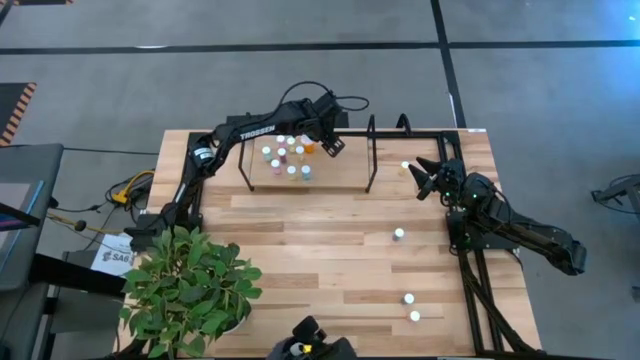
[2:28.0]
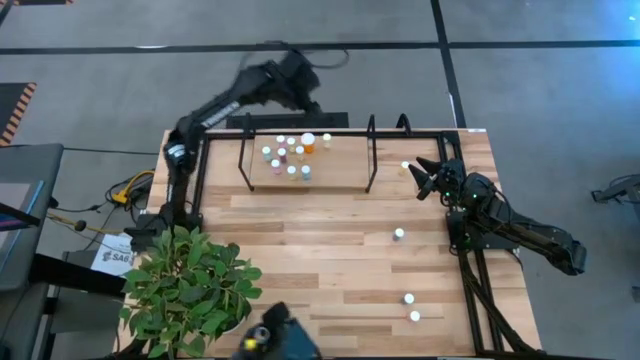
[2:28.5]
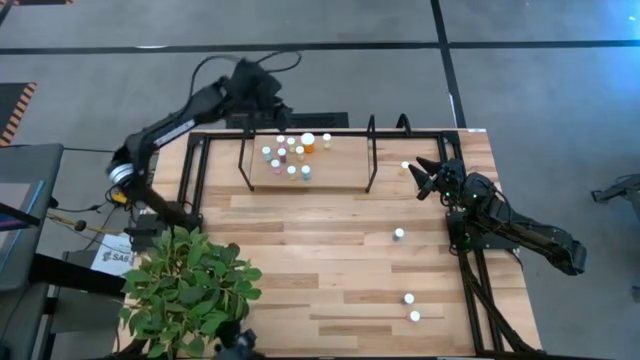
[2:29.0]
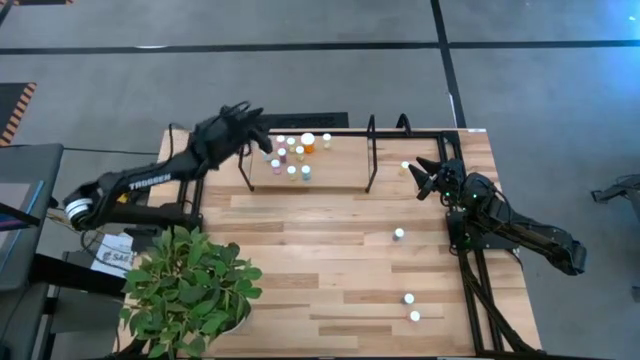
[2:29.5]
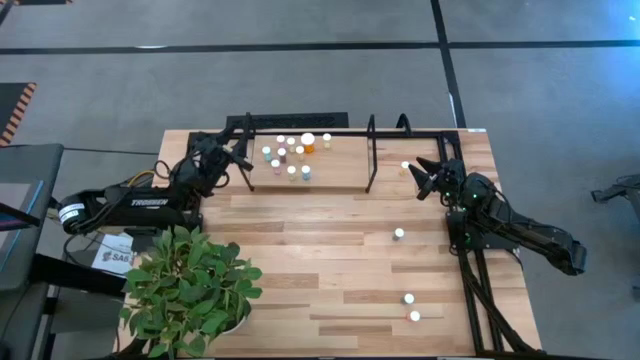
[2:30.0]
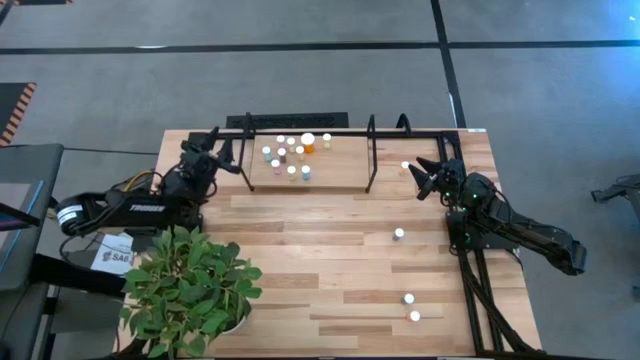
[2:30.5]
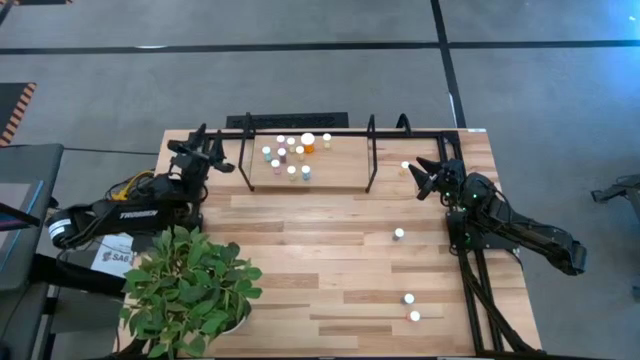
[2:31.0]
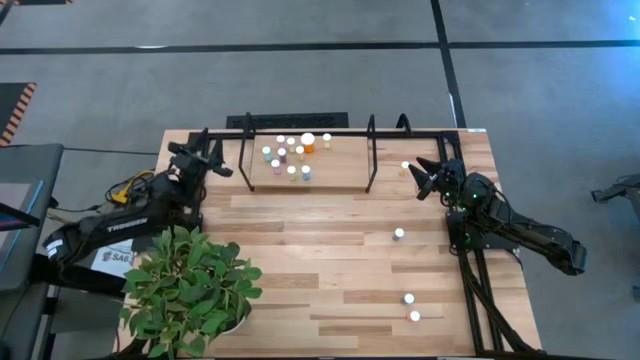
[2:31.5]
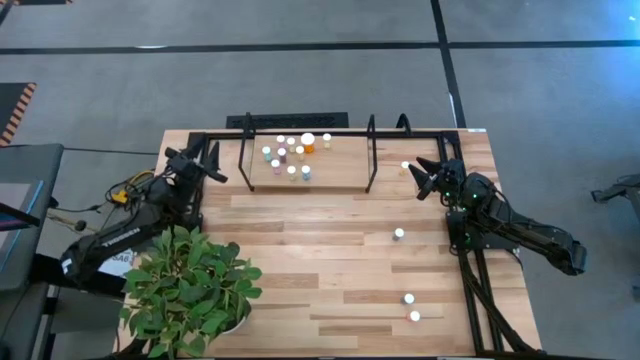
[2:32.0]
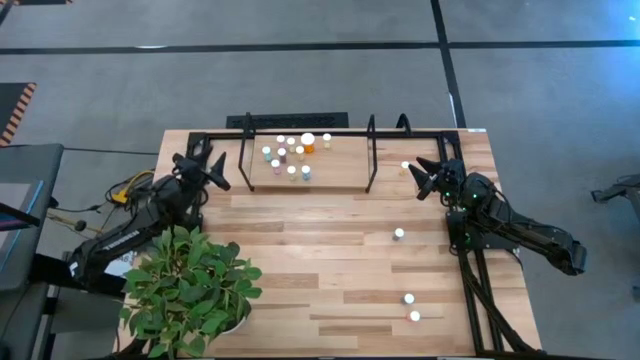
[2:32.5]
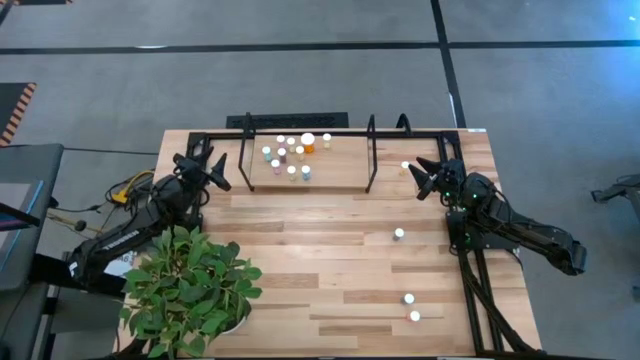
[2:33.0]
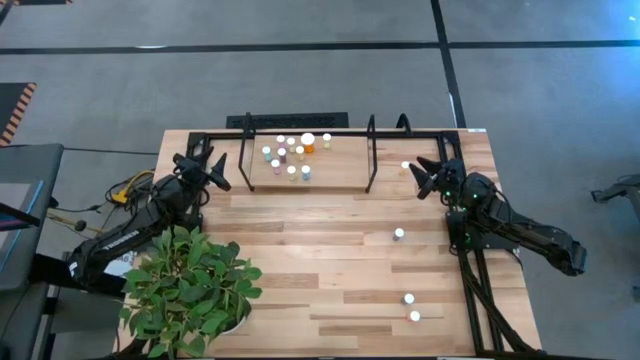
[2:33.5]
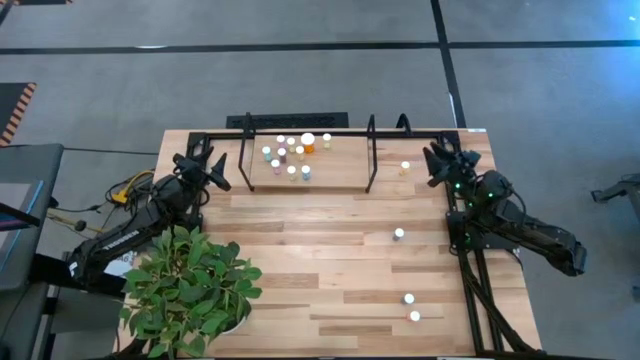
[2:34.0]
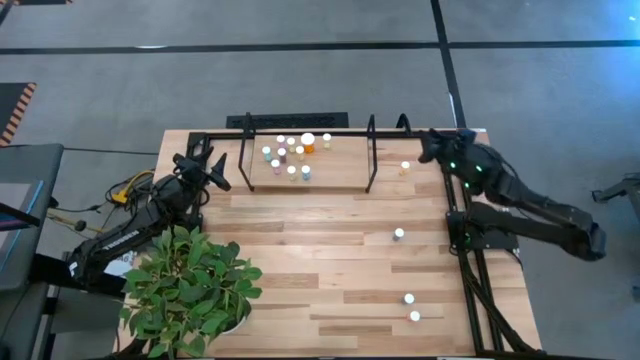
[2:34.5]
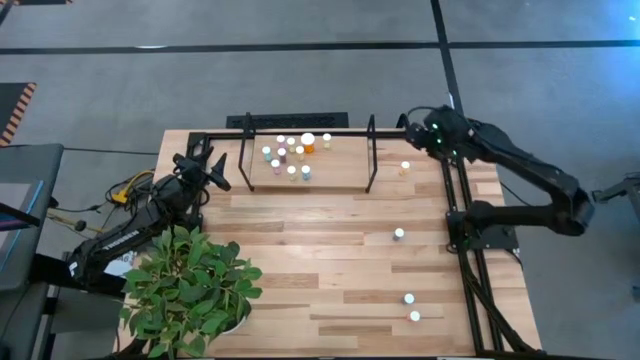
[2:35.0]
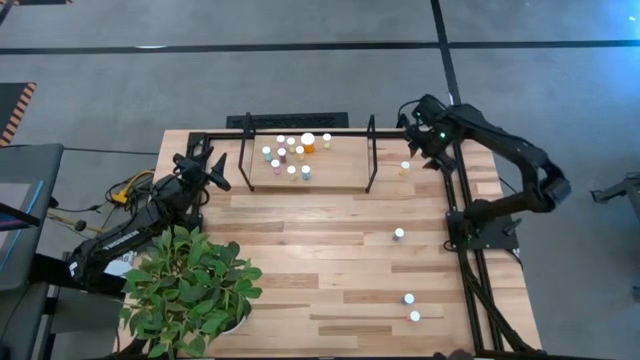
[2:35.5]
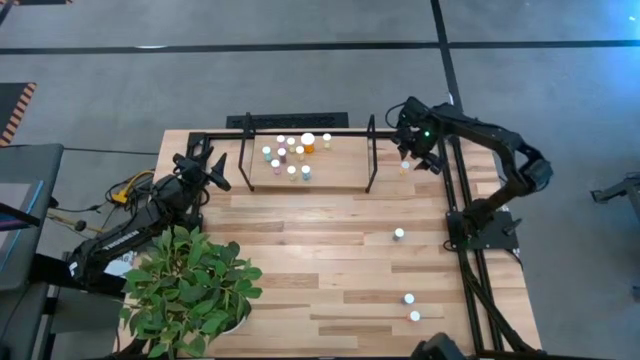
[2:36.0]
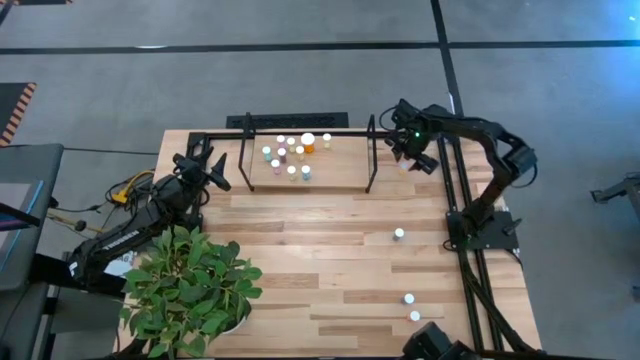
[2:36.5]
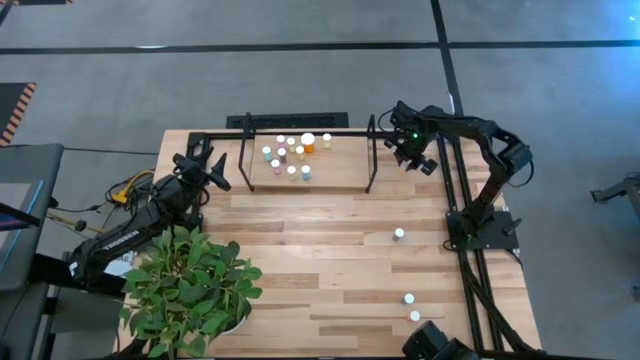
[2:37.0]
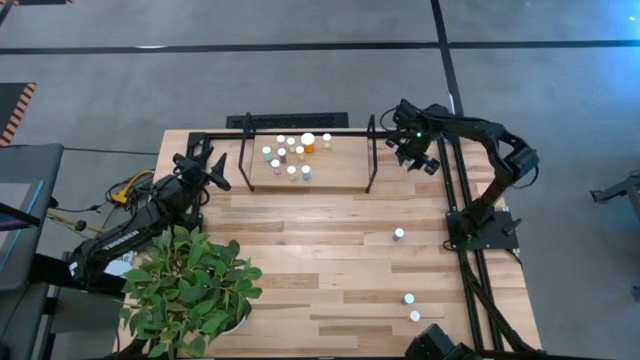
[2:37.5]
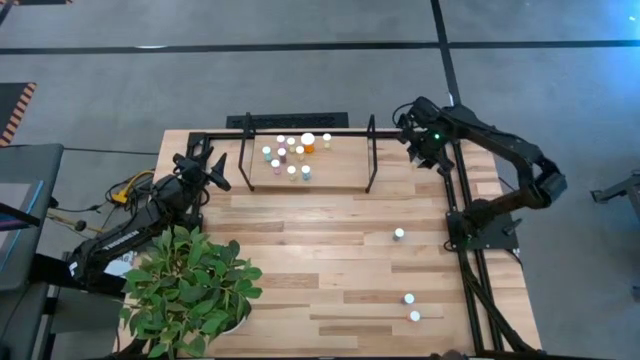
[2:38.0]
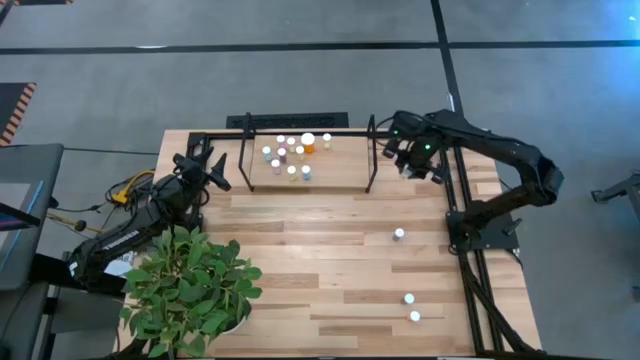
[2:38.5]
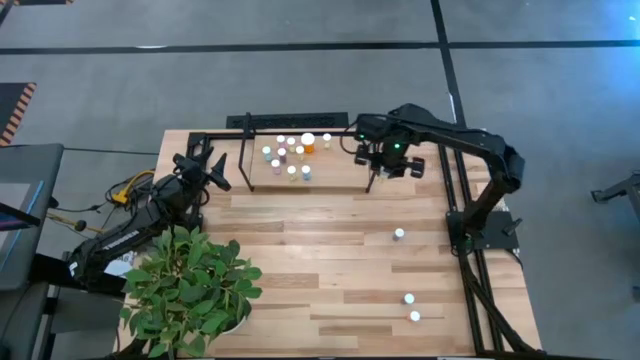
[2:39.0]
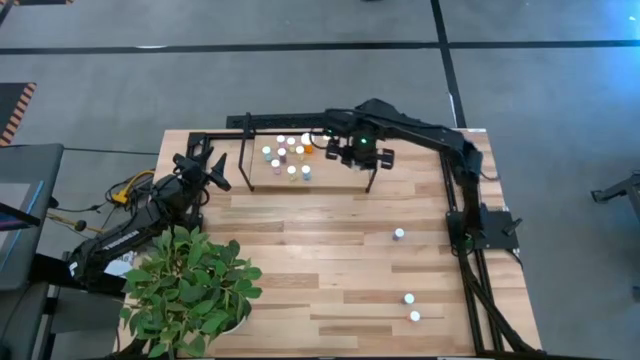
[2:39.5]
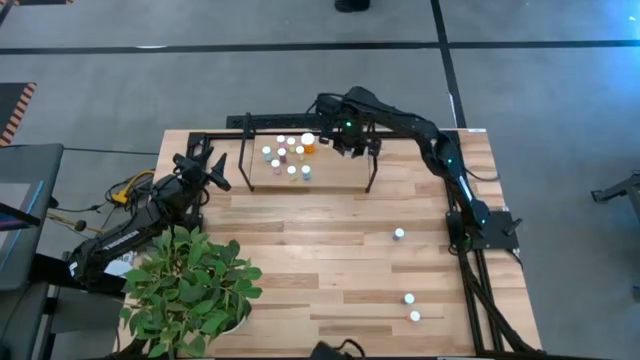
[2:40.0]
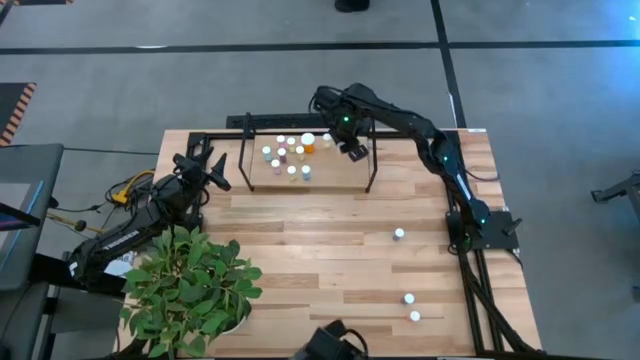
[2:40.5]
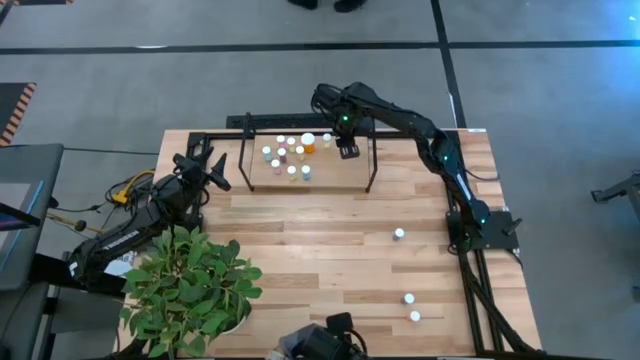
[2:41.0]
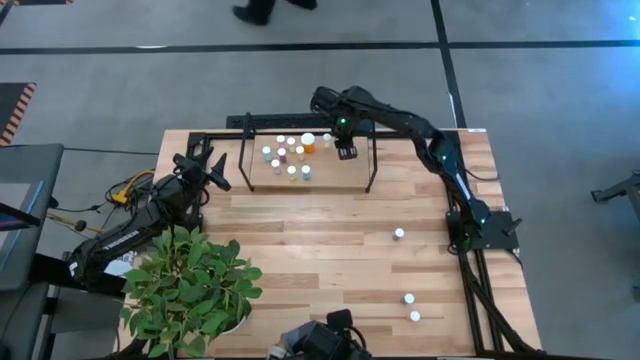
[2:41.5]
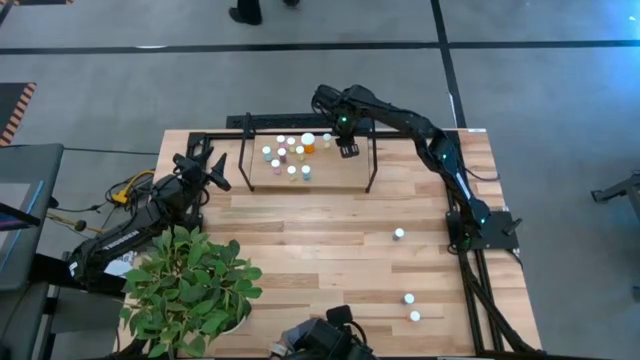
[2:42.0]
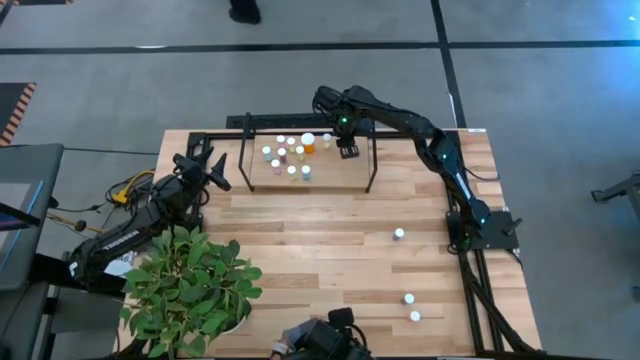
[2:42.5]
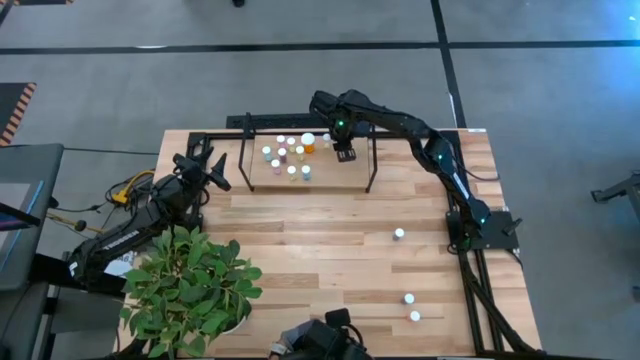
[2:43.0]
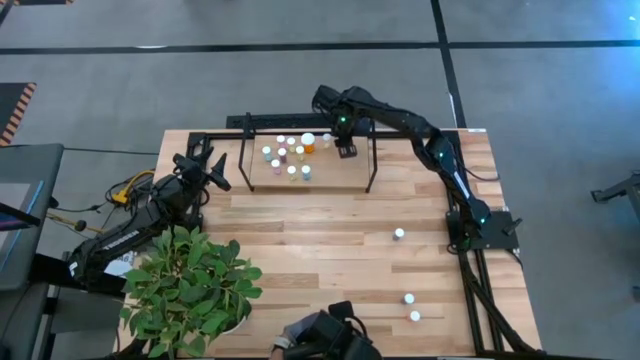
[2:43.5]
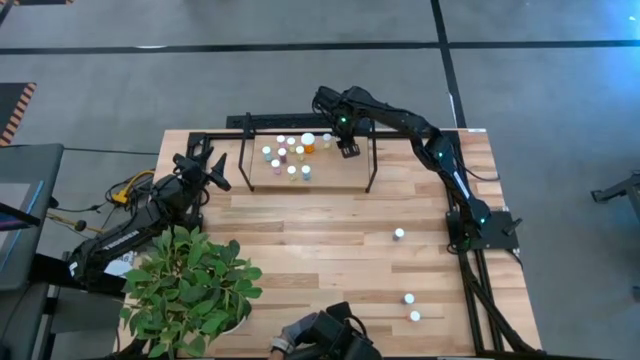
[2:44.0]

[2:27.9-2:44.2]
Task: Pick and place medicine bottles onto shelf by color
Put the yellow pill bottle on the shelf

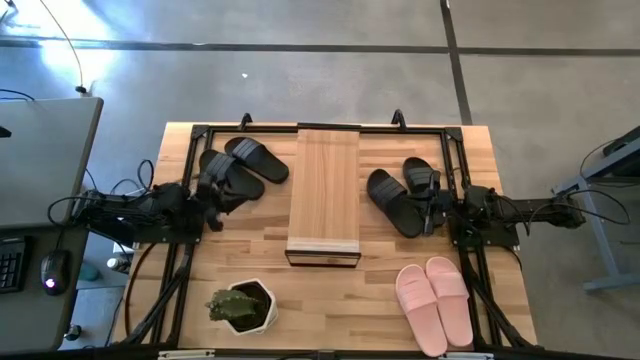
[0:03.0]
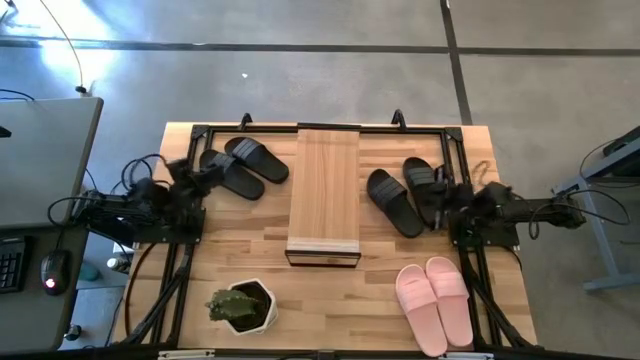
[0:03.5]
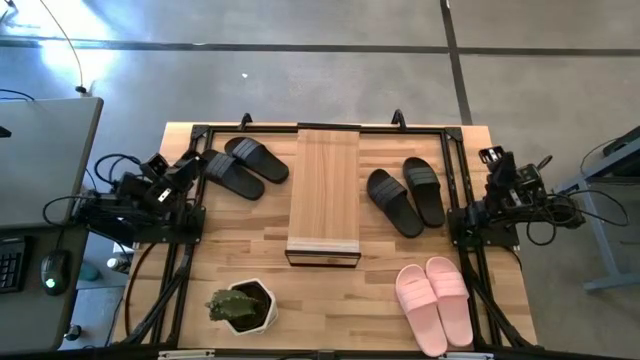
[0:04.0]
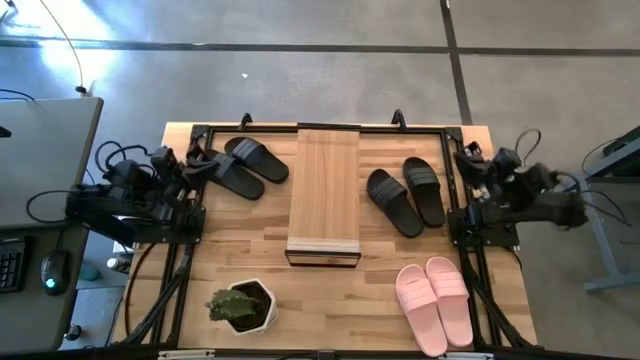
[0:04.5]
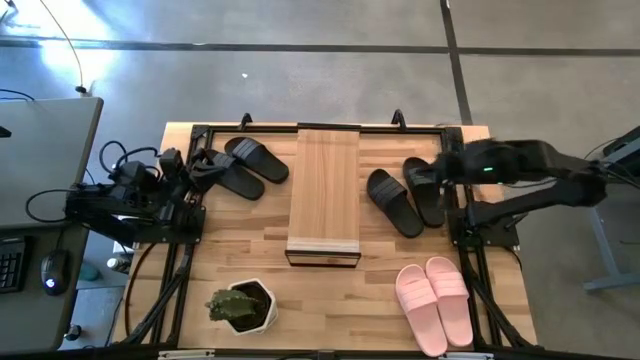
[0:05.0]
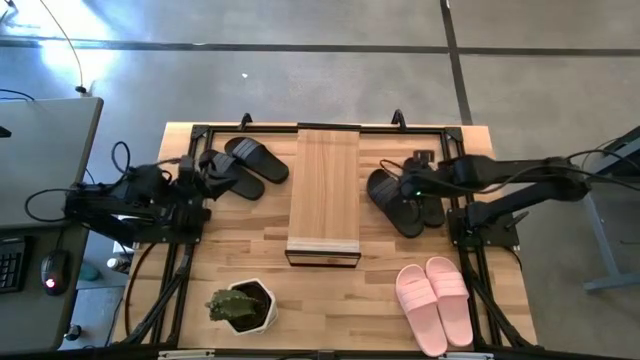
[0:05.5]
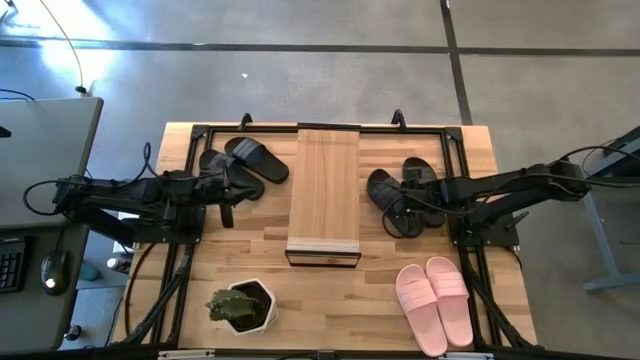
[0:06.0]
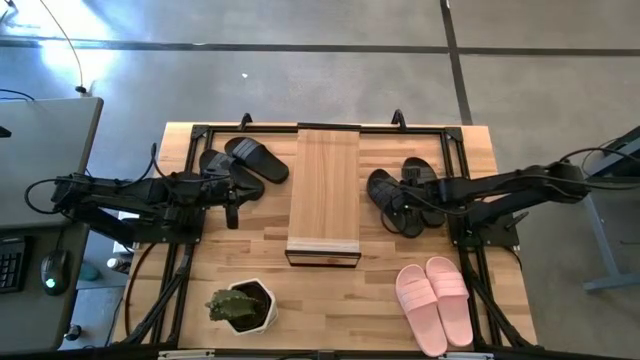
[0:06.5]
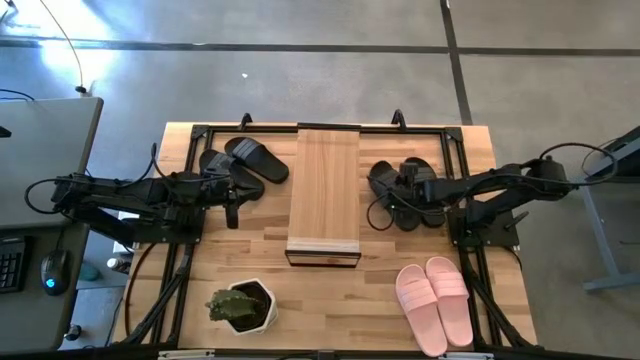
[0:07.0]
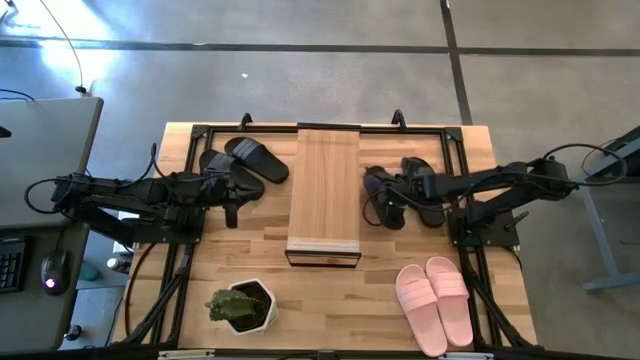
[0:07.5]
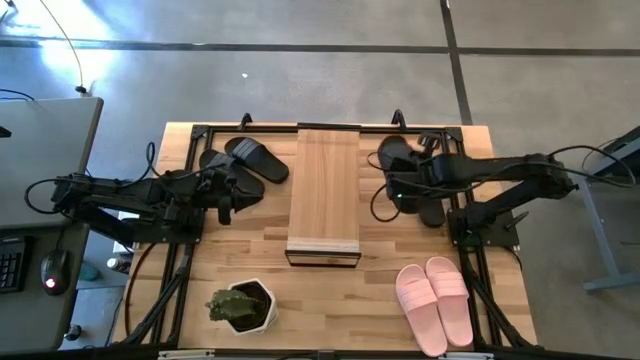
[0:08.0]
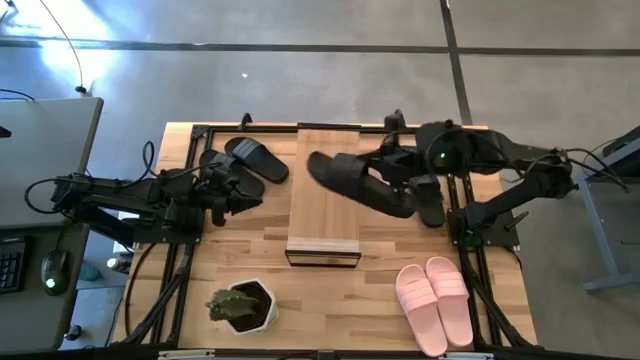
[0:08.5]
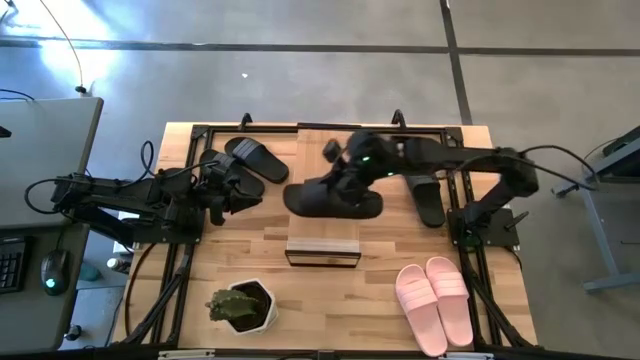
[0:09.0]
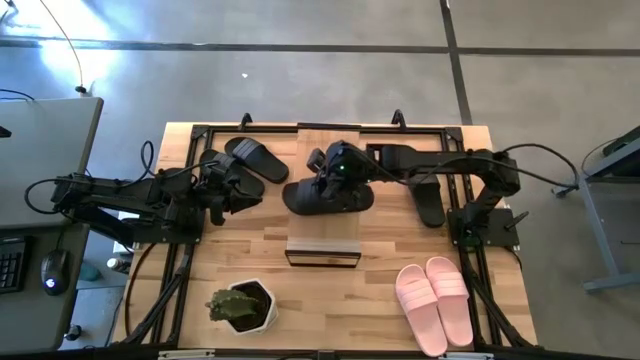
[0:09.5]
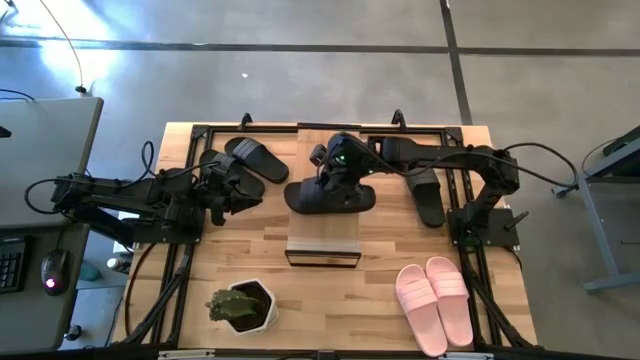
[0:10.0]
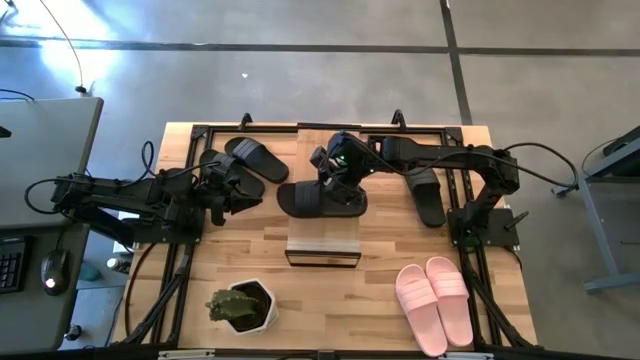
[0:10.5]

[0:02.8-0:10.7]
Task: Pick and place slides into the shelf
Put the black slipper on the shelf
